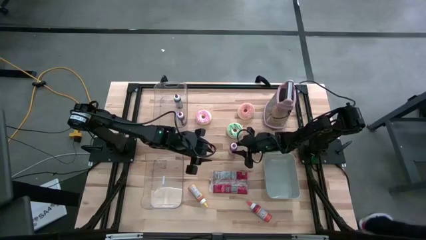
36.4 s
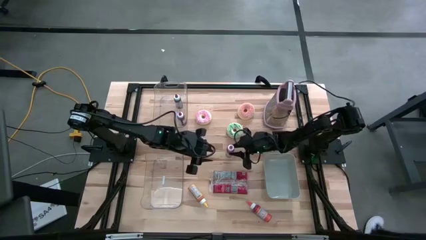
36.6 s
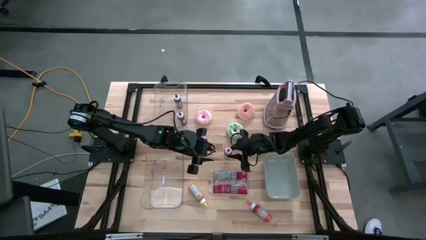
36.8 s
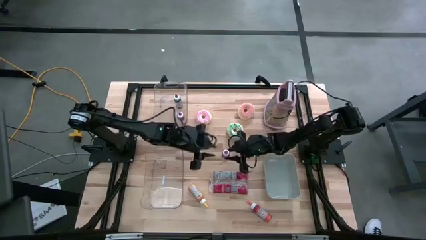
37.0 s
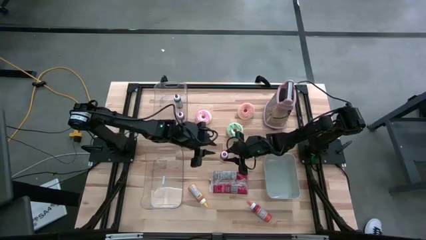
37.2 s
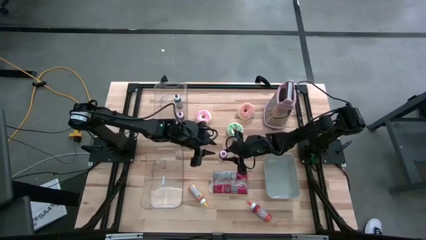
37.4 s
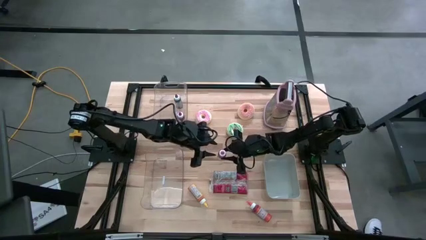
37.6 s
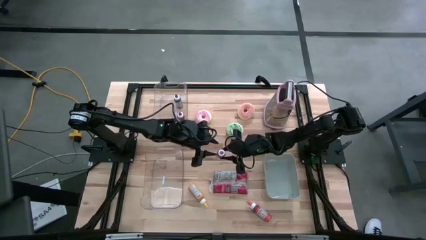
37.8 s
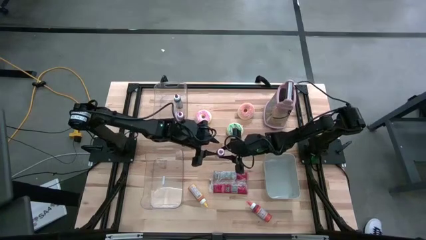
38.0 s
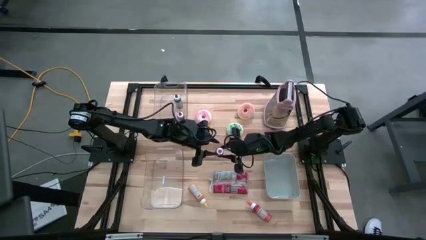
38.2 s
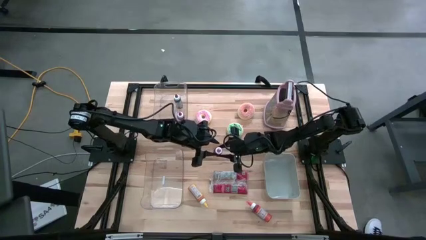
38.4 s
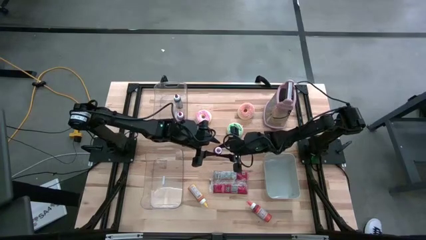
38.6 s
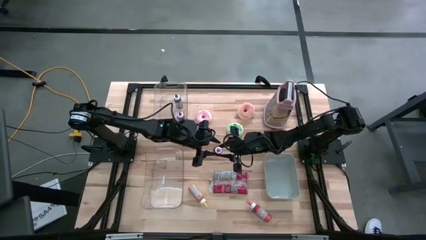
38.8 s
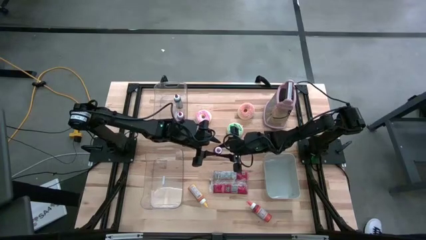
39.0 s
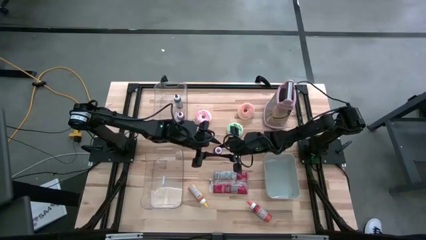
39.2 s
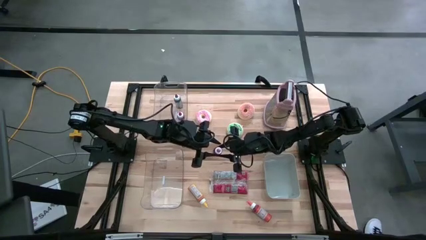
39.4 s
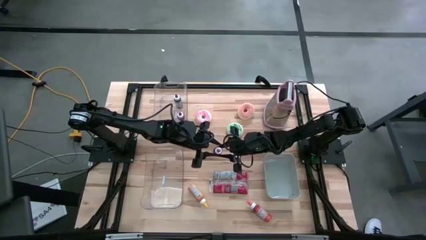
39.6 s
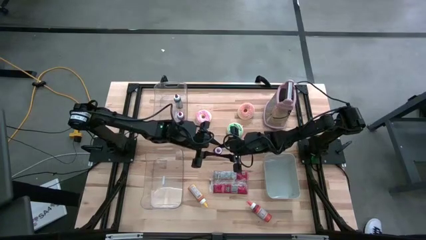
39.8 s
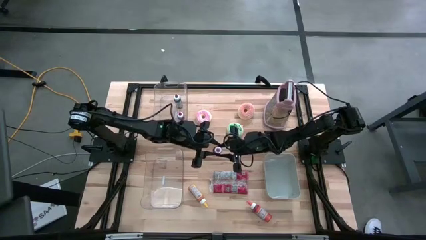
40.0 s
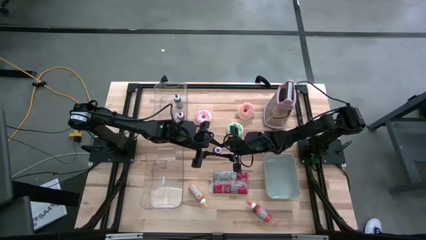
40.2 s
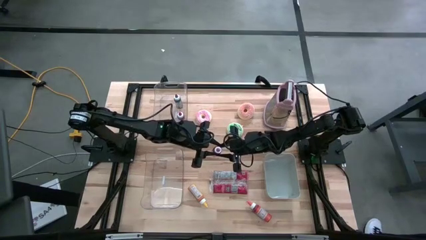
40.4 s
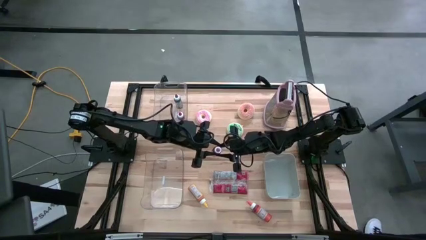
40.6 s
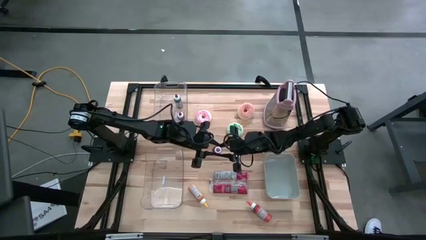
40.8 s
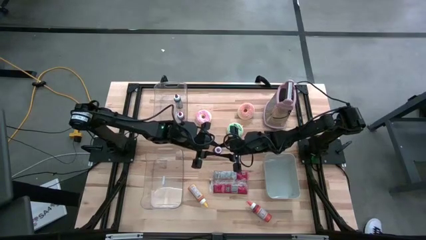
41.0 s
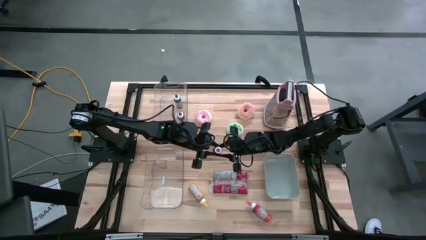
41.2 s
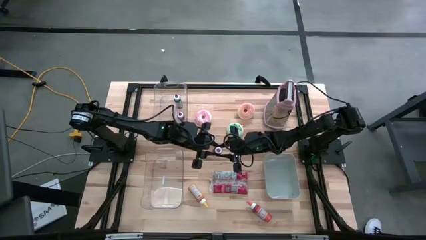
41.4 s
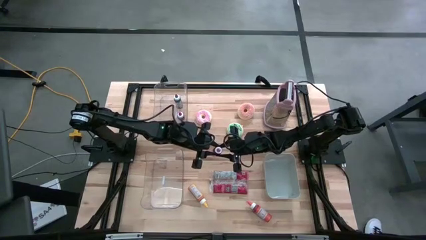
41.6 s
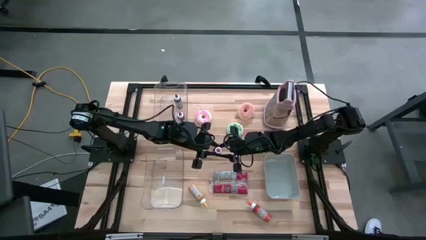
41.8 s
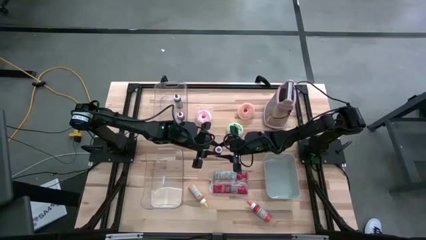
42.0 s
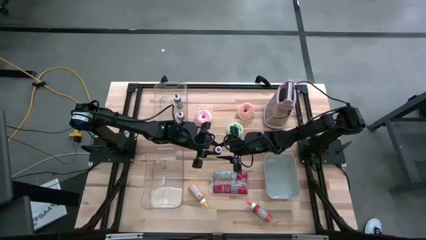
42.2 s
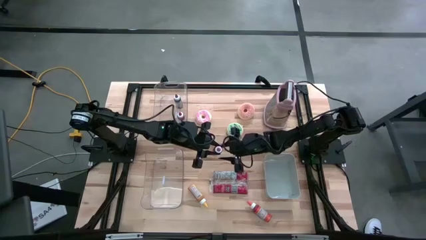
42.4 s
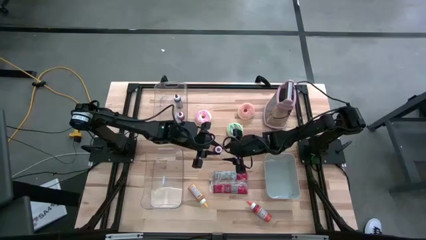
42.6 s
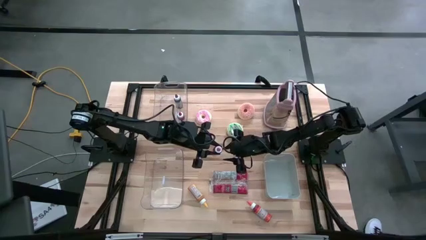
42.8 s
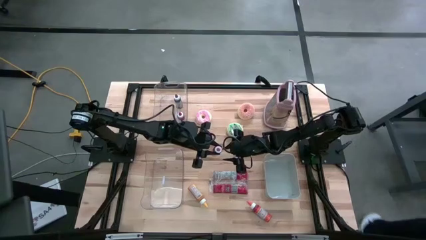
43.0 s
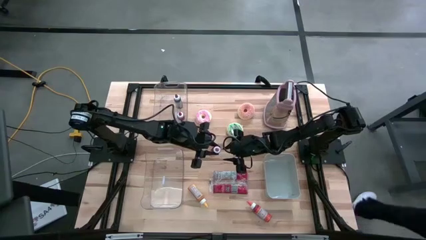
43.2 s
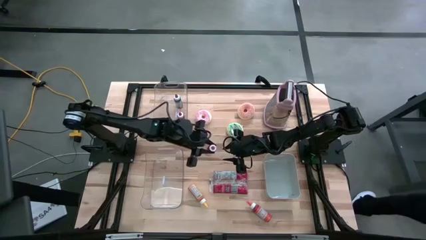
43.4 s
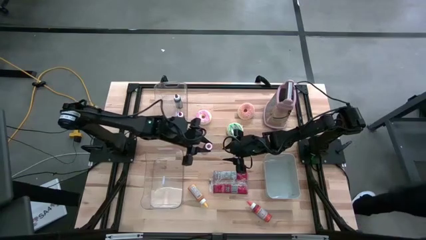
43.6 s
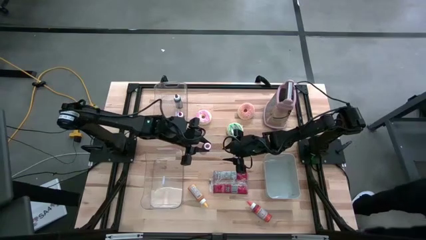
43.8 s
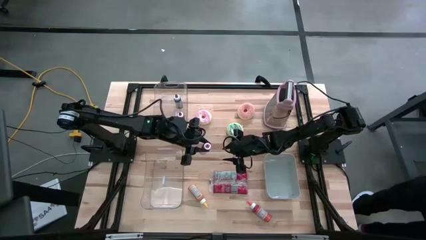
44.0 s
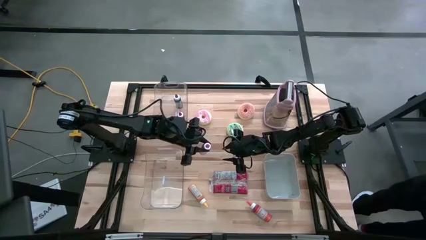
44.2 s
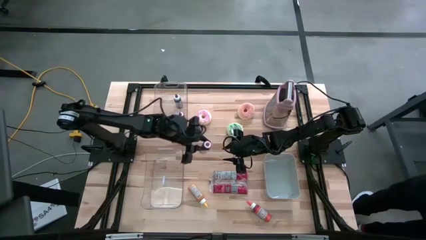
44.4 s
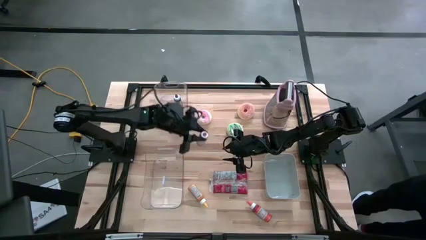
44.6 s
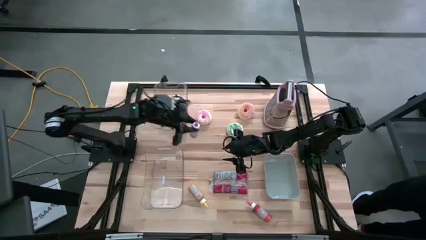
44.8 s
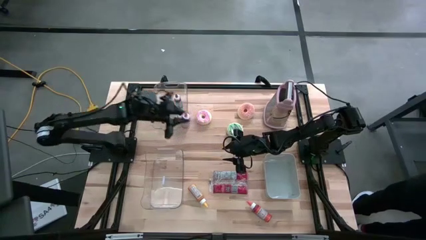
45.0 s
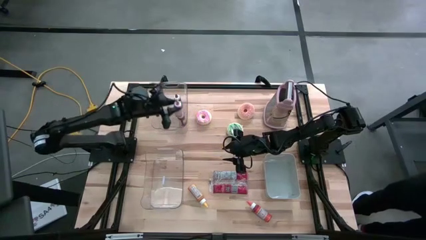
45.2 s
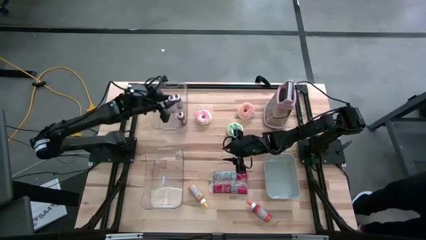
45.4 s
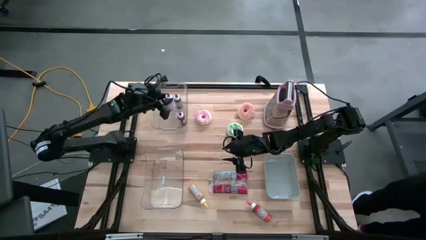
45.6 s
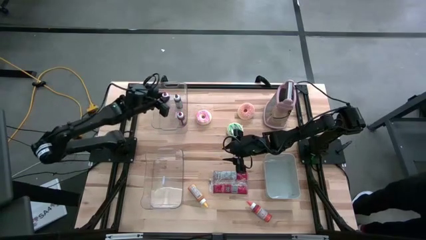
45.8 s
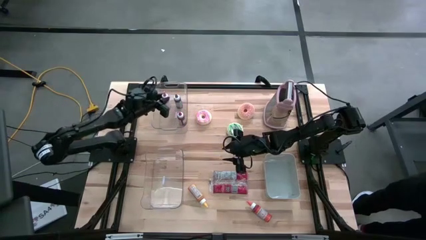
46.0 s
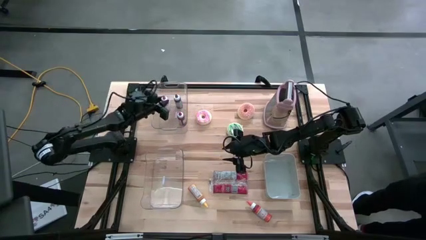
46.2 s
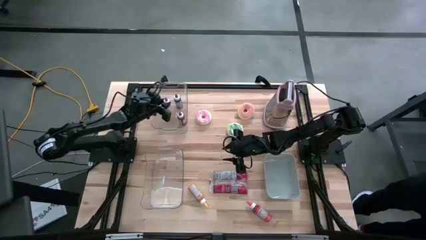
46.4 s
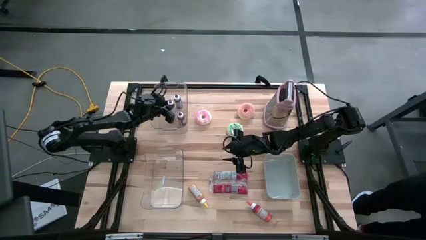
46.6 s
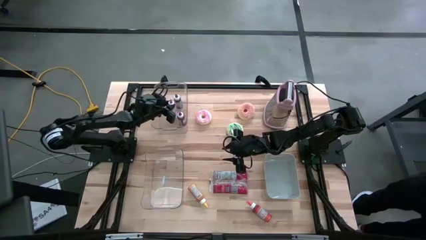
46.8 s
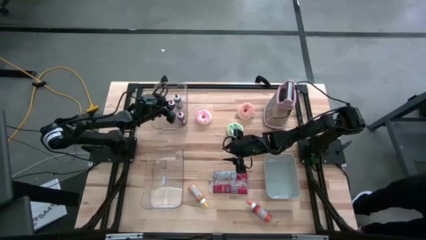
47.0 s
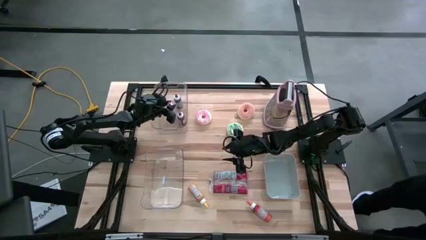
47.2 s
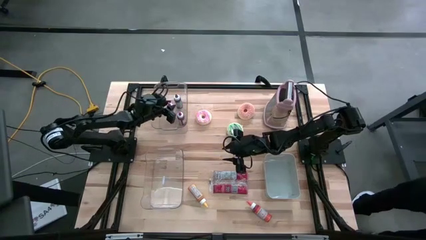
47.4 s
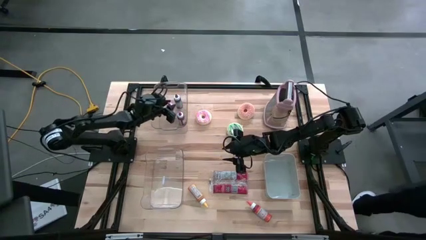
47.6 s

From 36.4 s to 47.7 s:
Put the pink food coloring bottle into the top transparent bin
